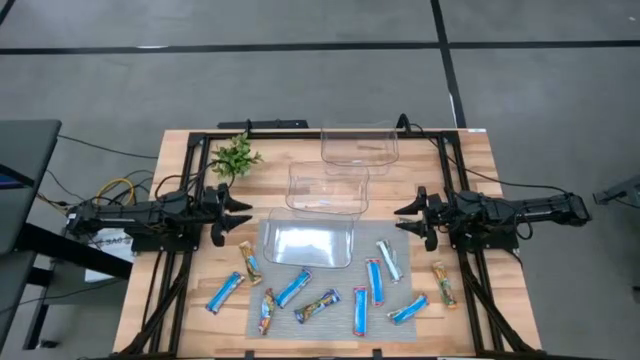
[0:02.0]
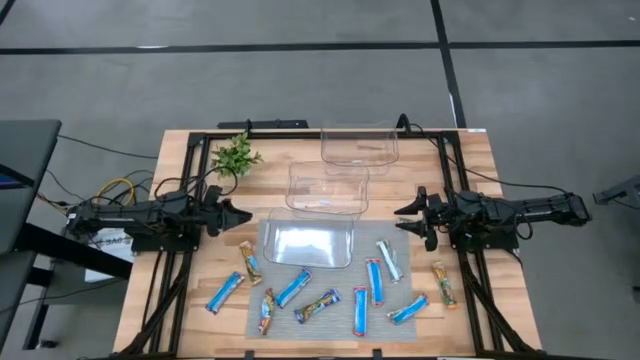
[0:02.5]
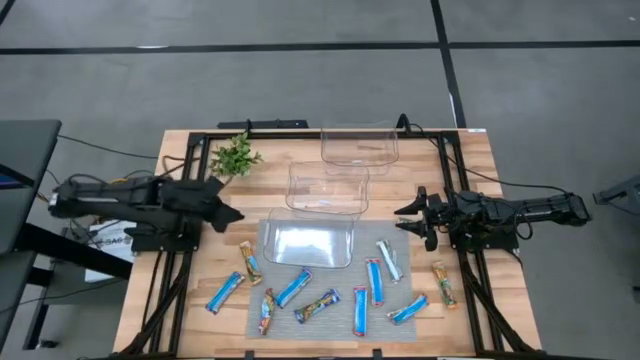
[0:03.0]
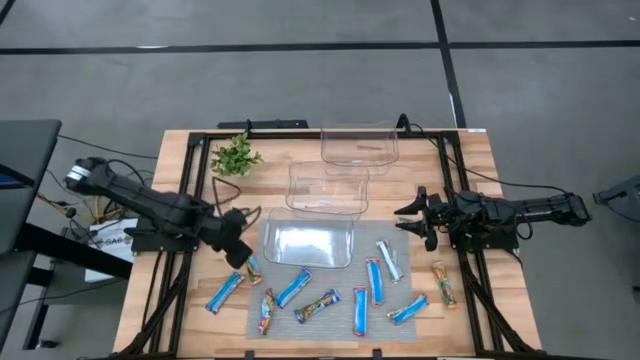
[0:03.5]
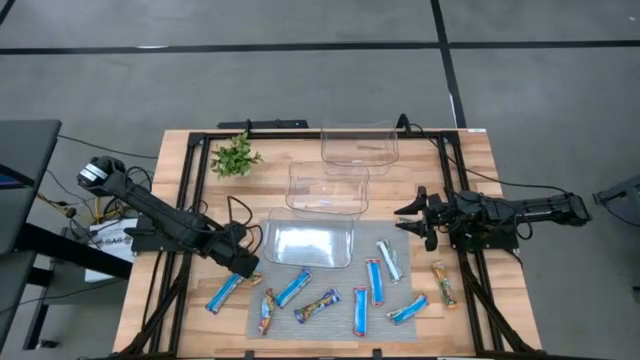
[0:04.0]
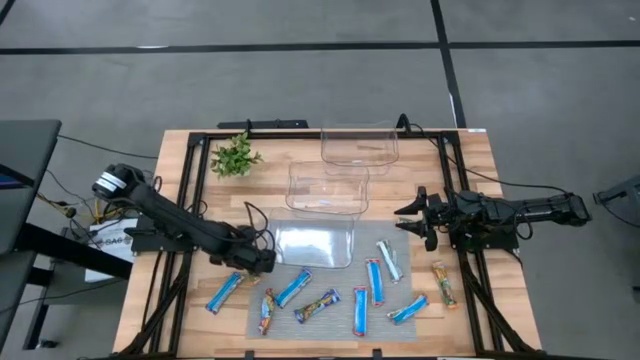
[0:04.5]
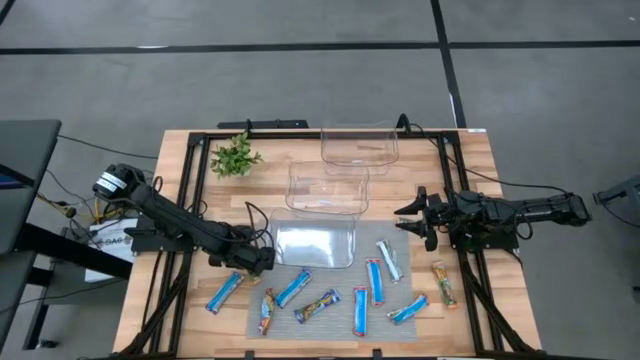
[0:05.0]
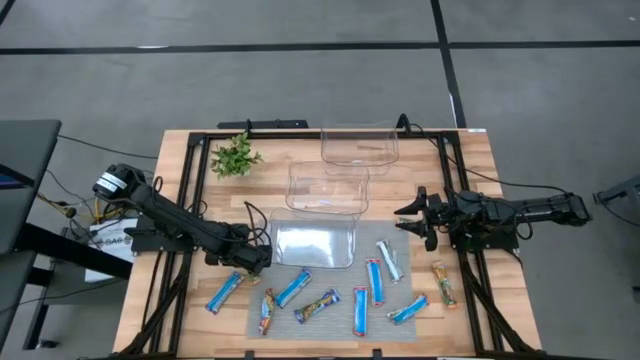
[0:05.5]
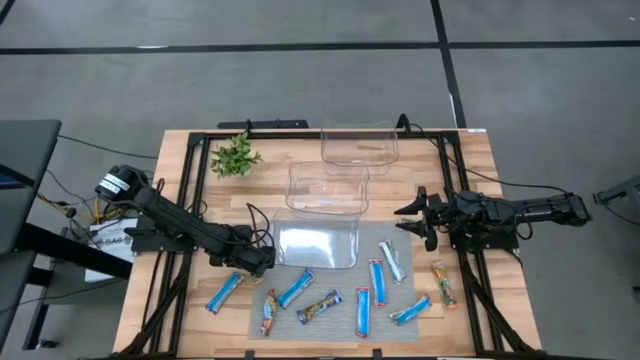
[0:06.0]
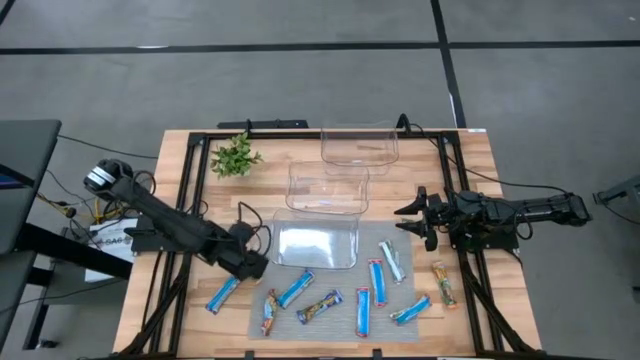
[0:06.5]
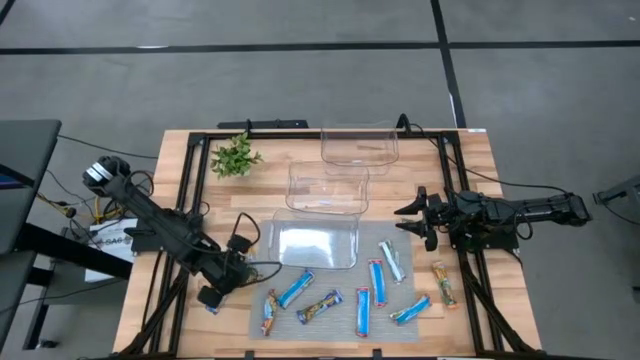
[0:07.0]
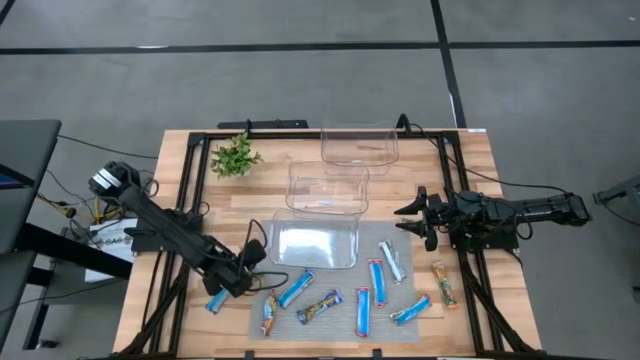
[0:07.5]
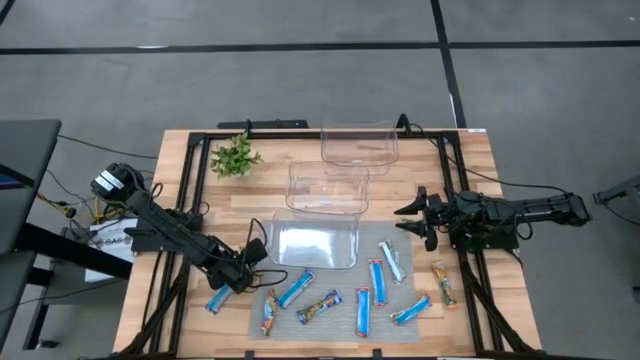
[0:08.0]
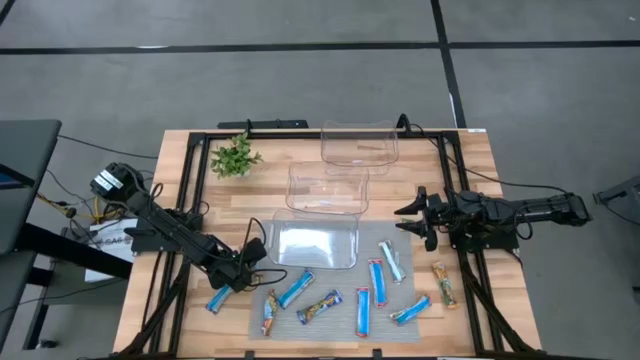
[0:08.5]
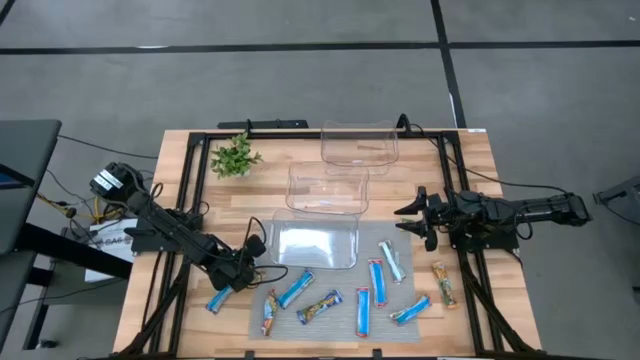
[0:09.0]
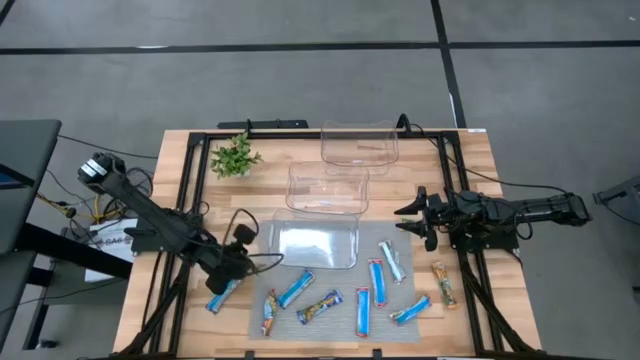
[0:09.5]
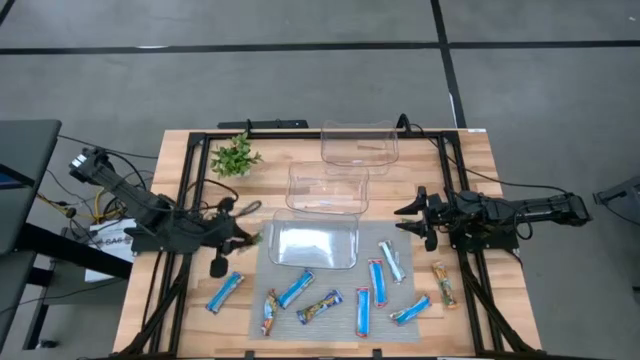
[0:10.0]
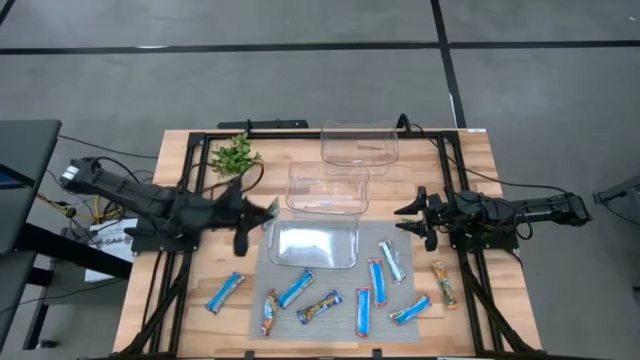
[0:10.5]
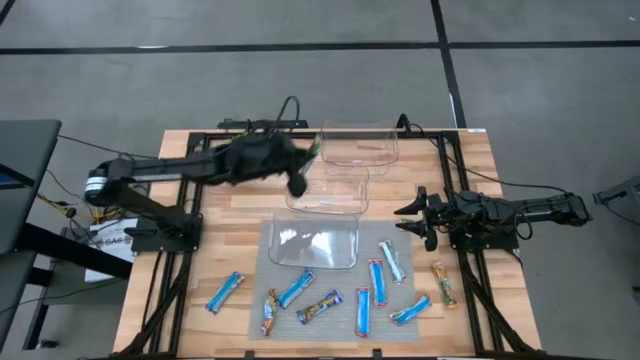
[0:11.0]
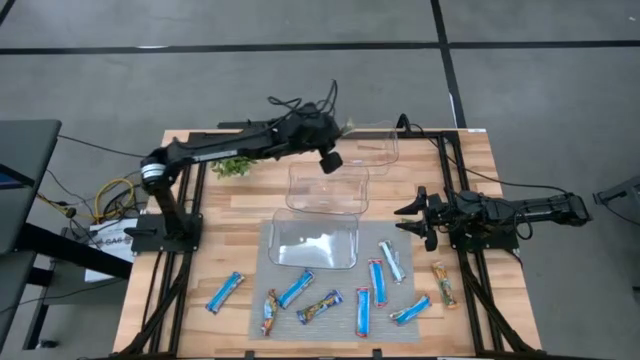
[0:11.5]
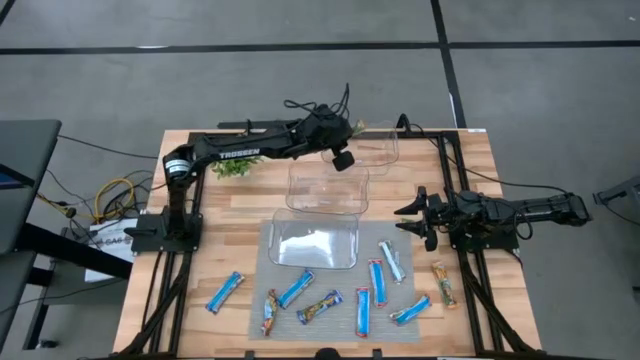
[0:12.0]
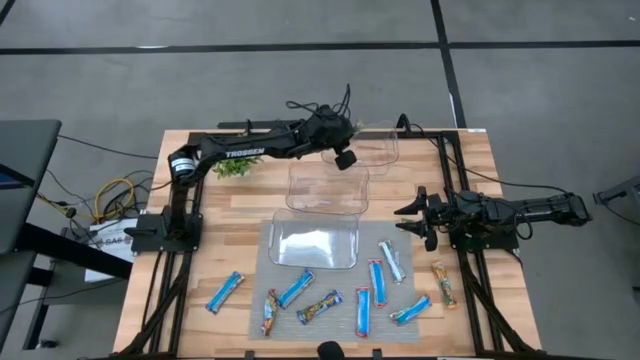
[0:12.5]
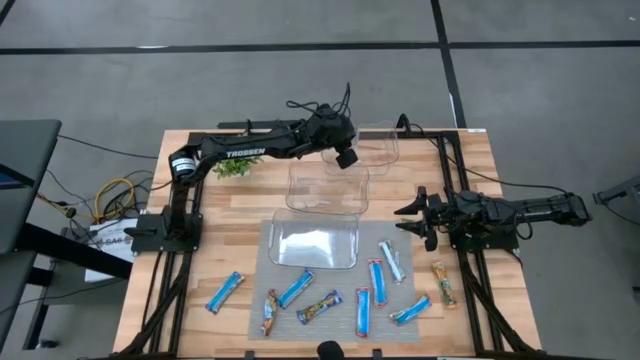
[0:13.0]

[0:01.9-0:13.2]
Task: Pick and place Granola Bars by type
Put the yellow granola bar into the top transparent bin

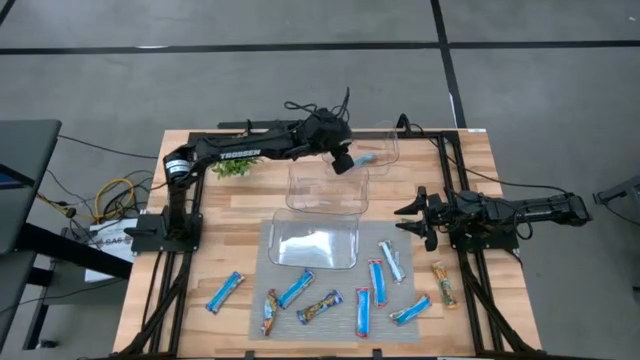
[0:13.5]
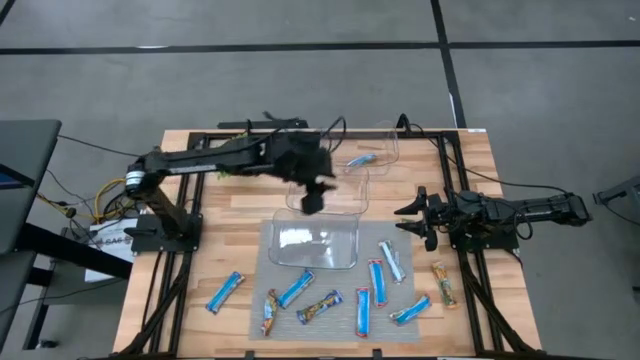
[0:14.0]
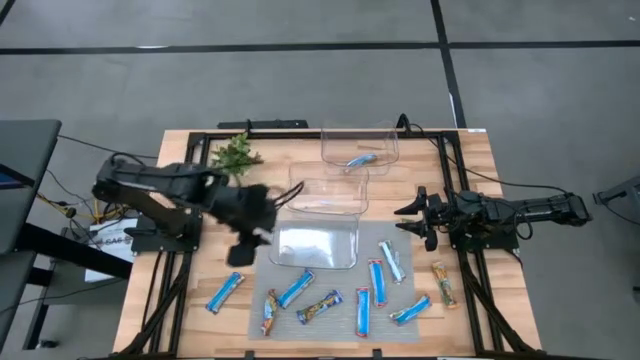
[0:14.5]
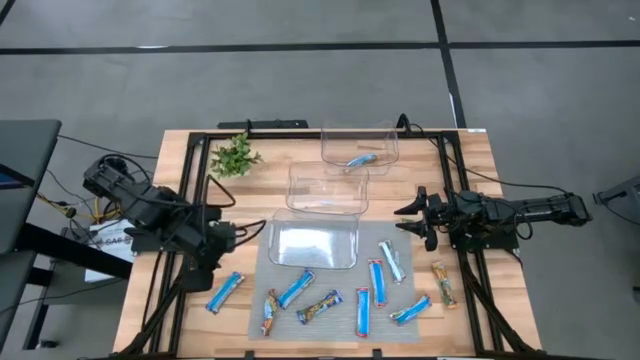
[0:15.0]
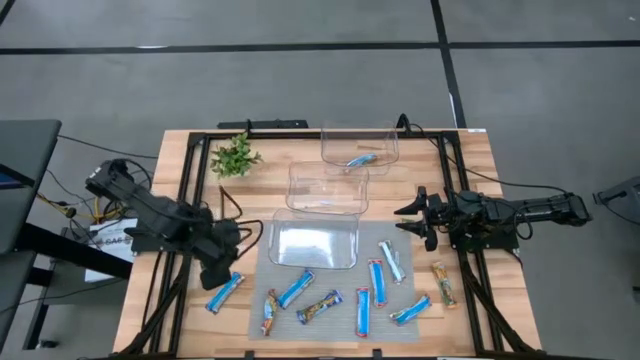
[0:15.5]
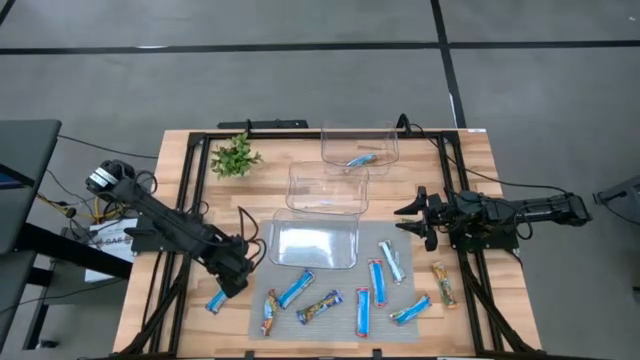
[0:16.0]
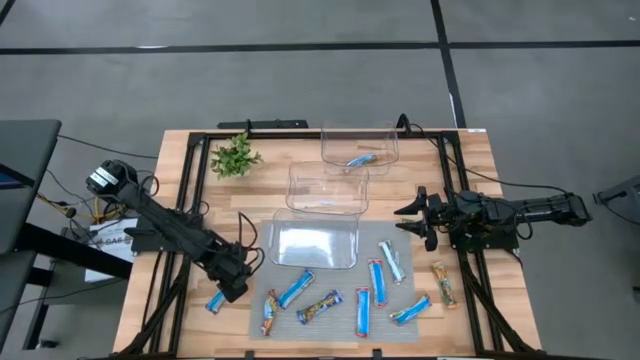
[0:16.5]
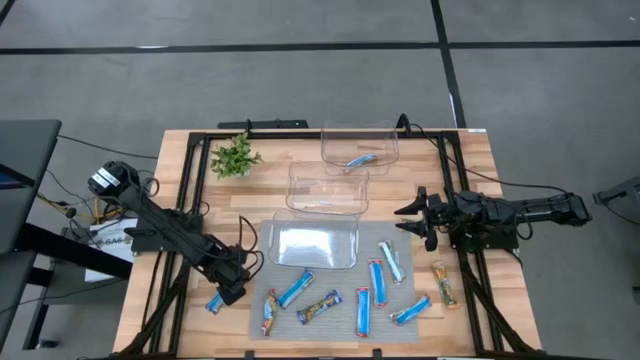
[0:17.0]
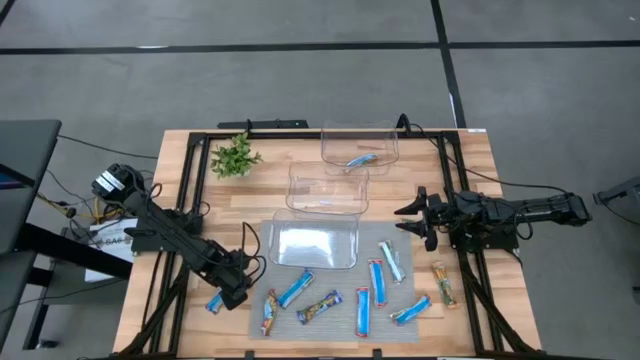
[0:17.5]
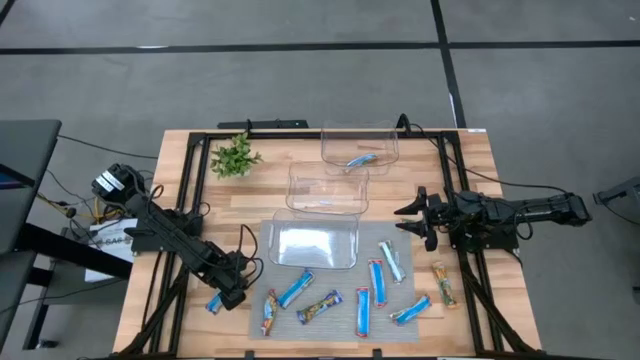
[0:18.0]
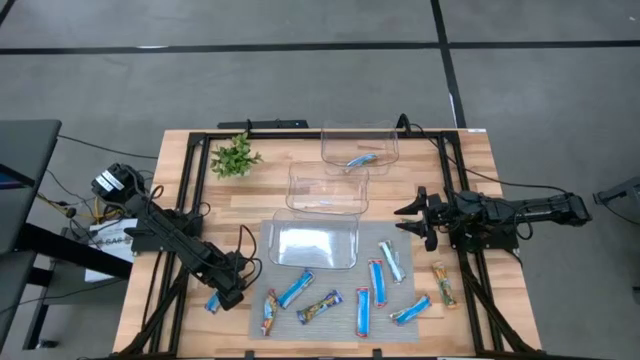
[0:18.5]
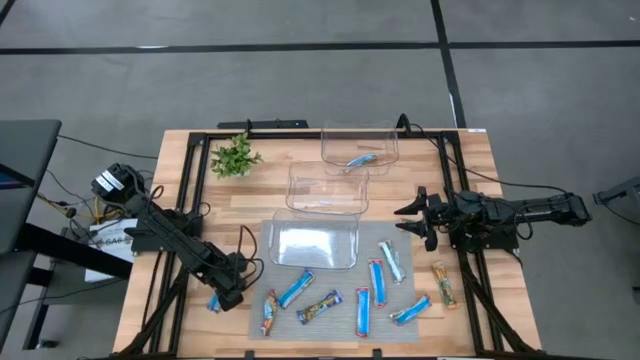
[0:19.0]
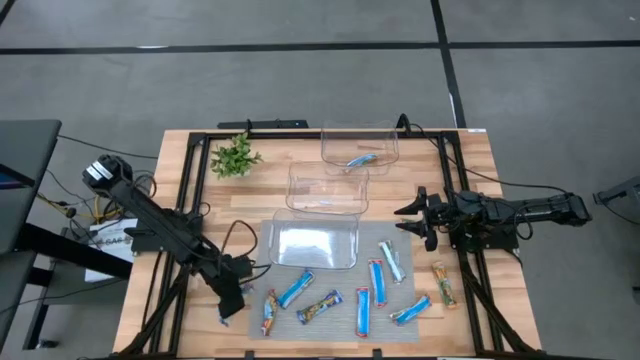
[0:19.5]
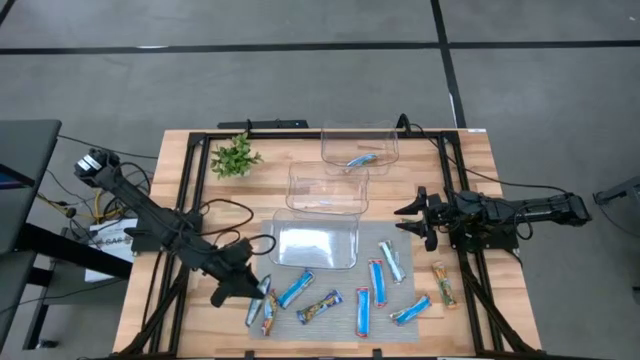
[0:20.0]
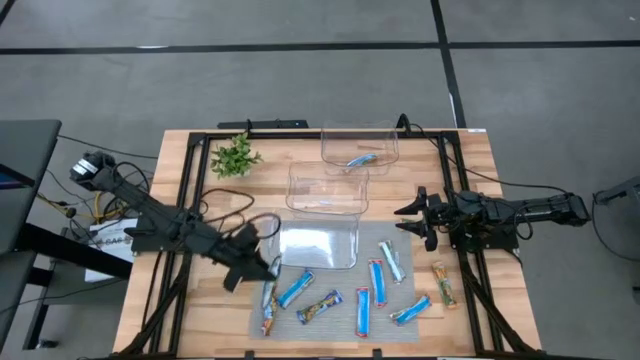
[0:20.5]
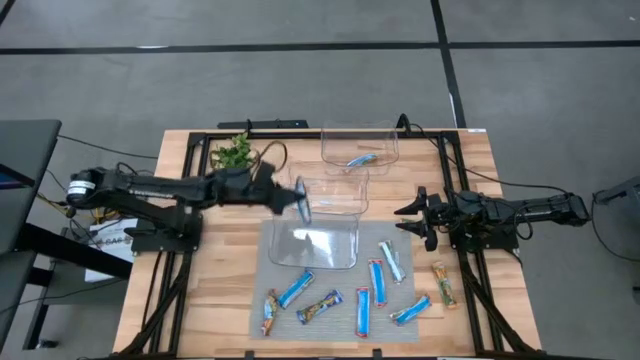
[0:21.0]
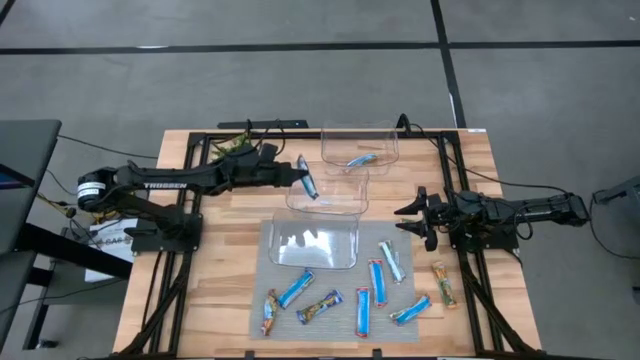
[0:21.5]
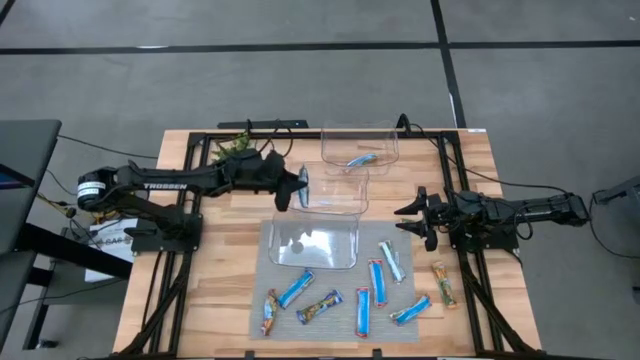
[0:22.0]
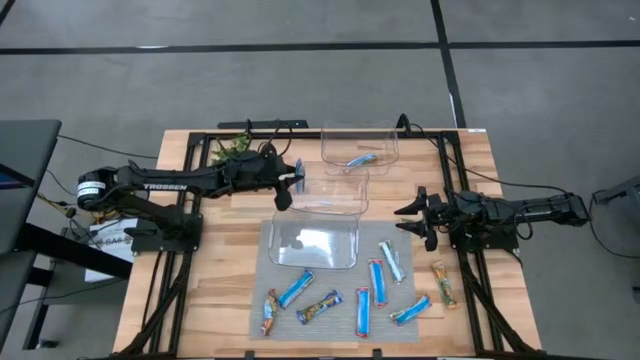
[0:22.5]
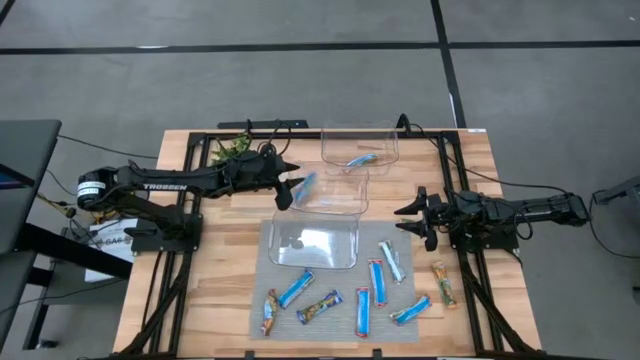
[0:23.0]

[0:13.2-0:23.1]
Put the top left blue granola bar into the middle transparent bin
